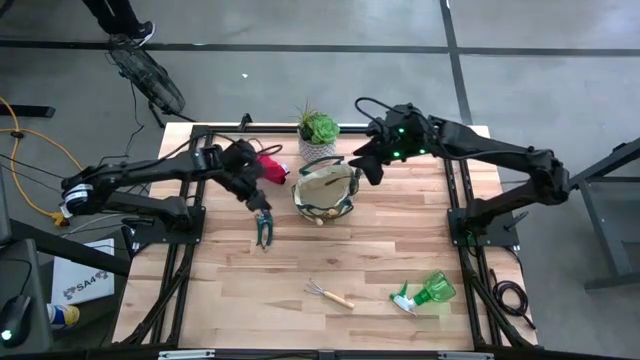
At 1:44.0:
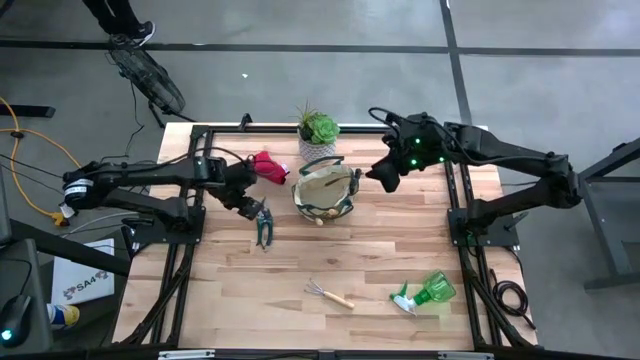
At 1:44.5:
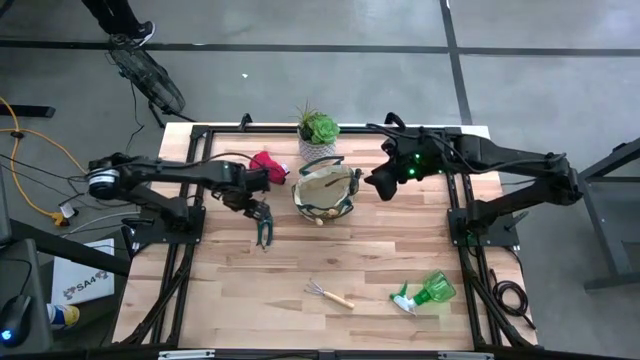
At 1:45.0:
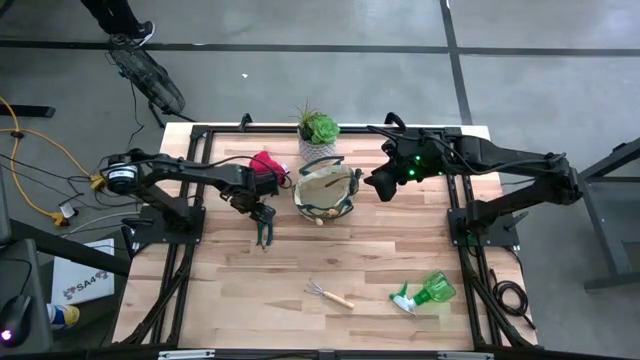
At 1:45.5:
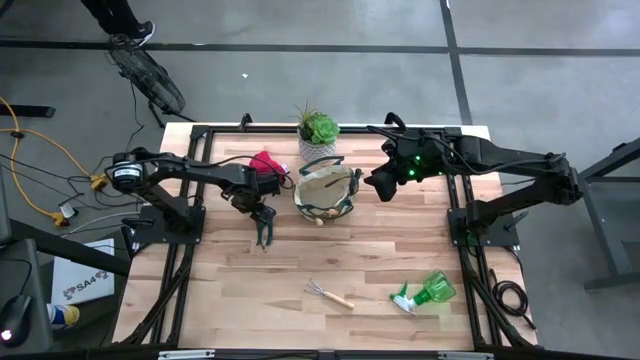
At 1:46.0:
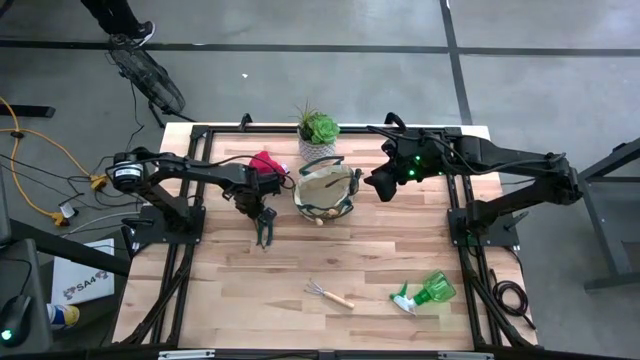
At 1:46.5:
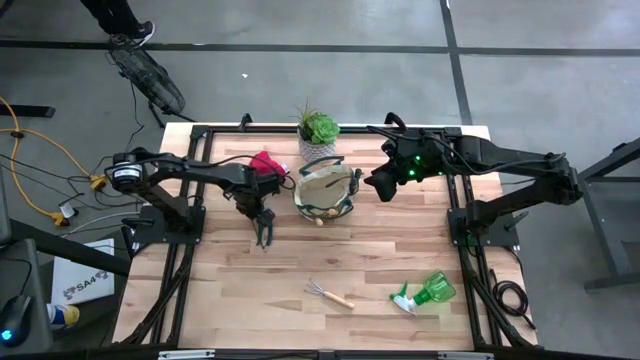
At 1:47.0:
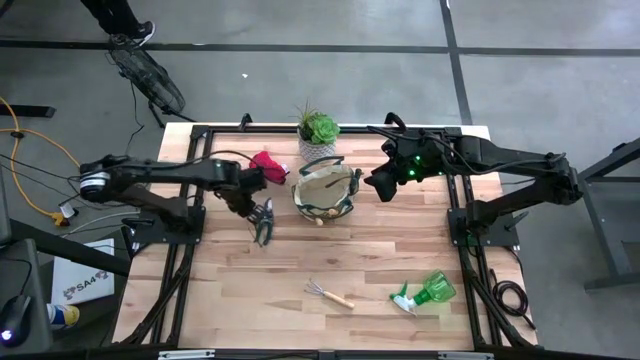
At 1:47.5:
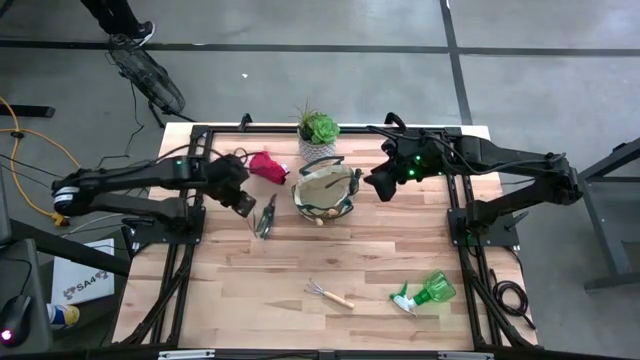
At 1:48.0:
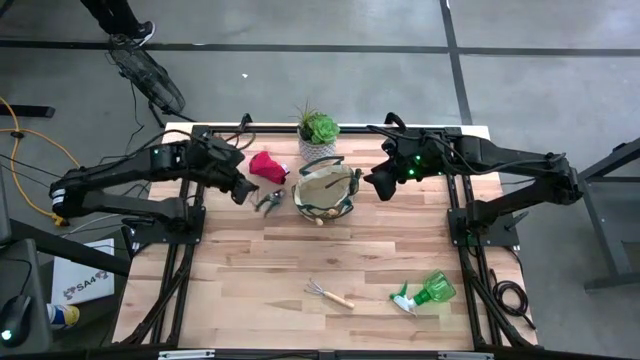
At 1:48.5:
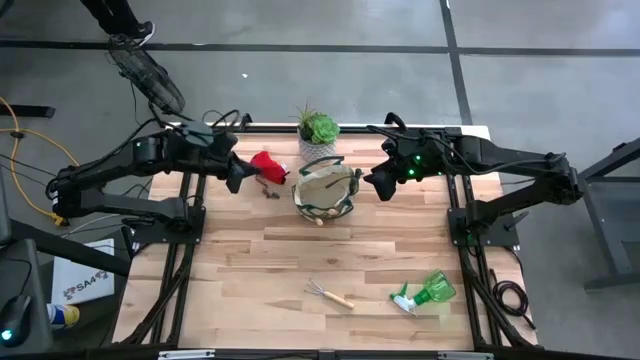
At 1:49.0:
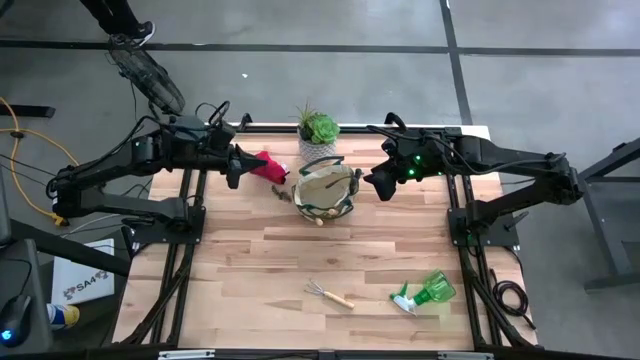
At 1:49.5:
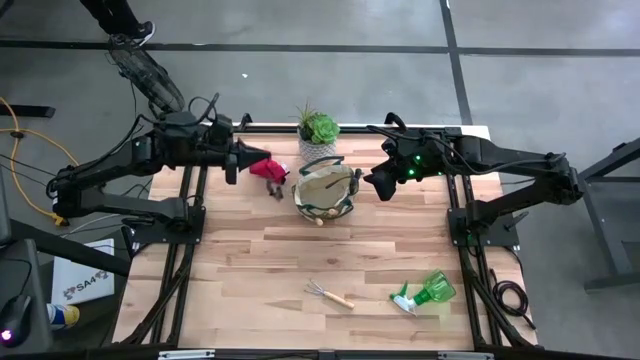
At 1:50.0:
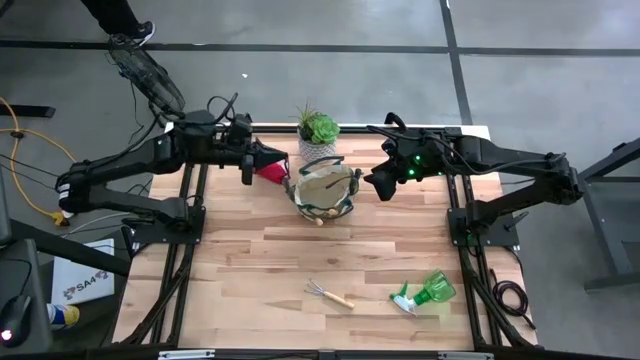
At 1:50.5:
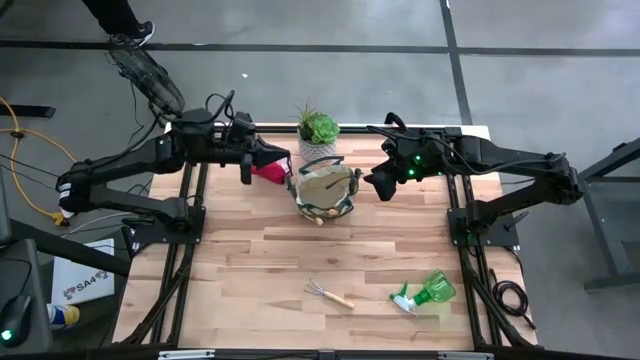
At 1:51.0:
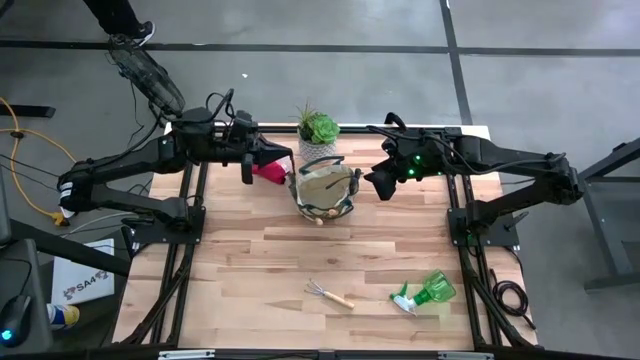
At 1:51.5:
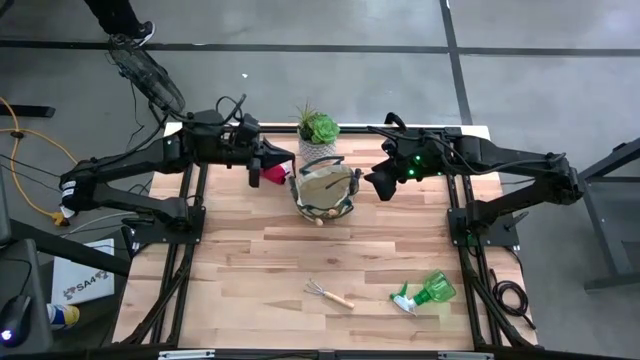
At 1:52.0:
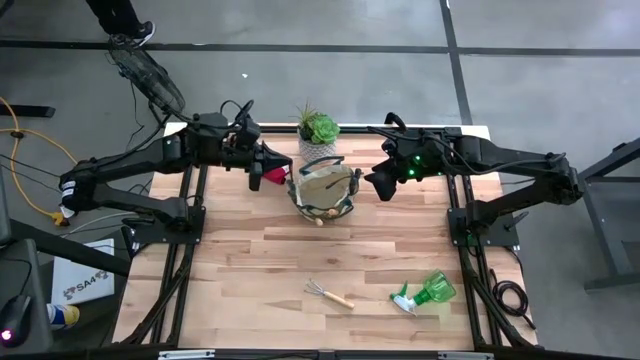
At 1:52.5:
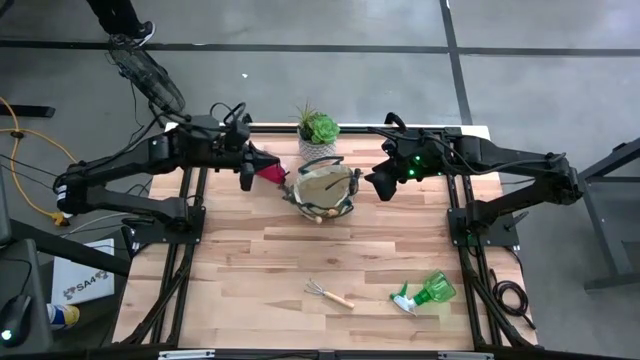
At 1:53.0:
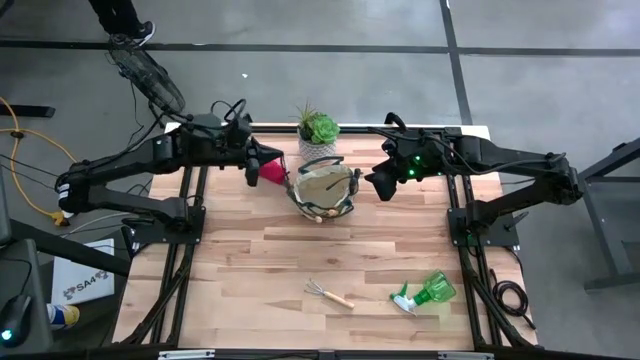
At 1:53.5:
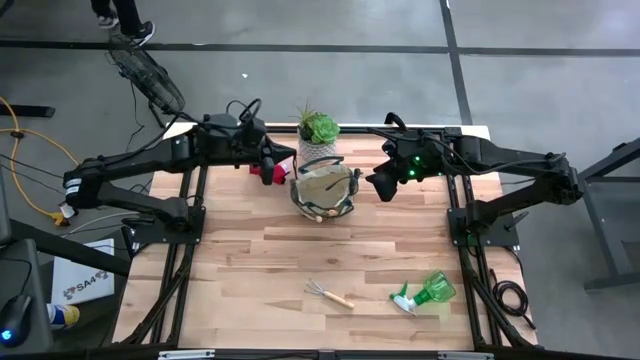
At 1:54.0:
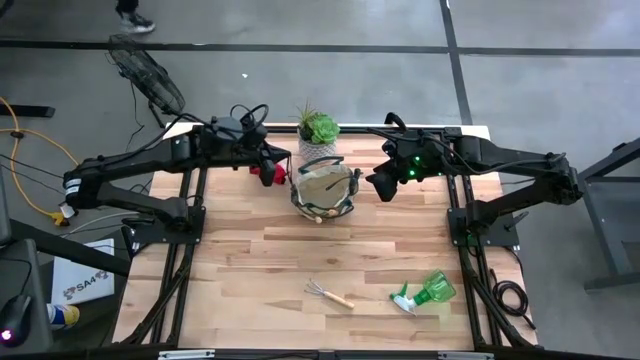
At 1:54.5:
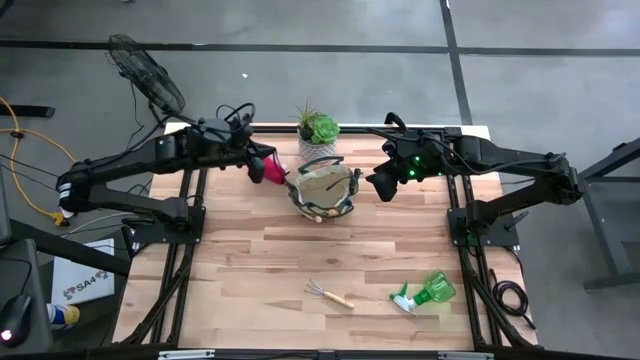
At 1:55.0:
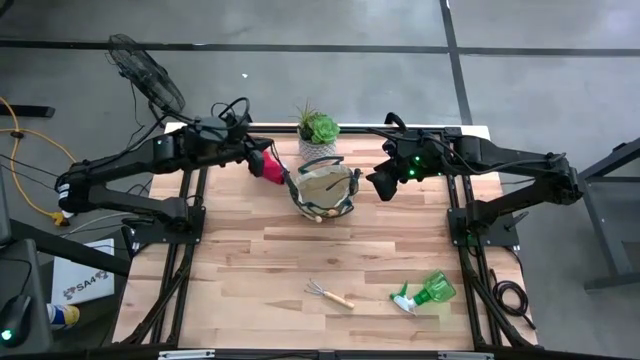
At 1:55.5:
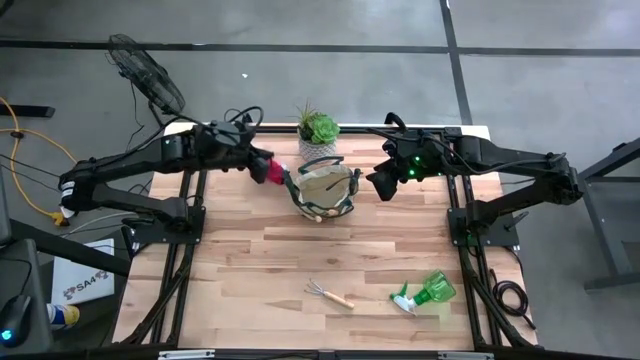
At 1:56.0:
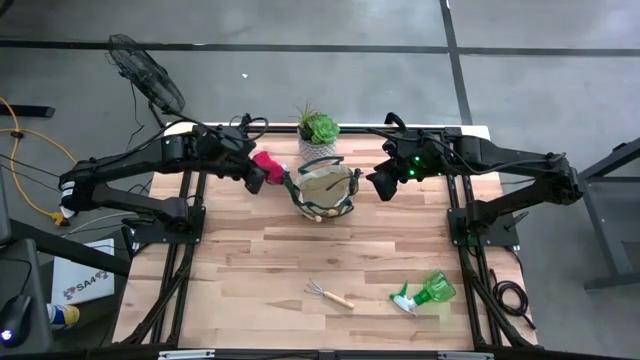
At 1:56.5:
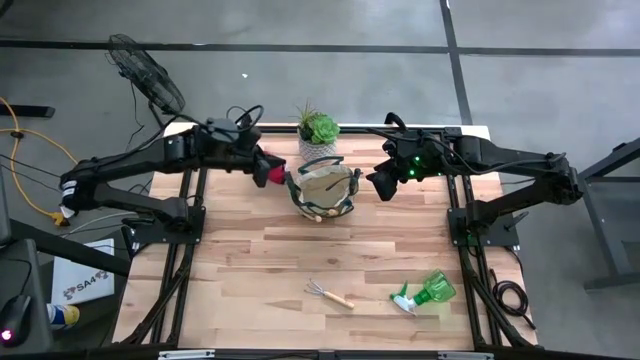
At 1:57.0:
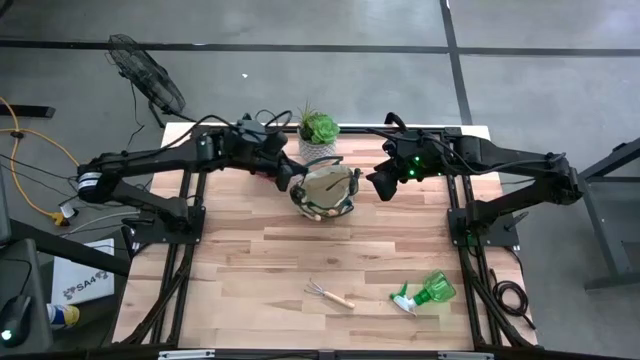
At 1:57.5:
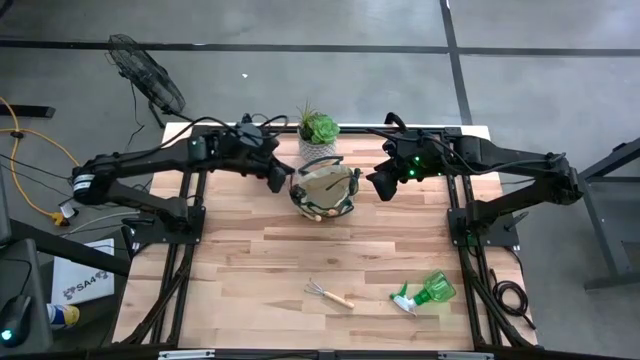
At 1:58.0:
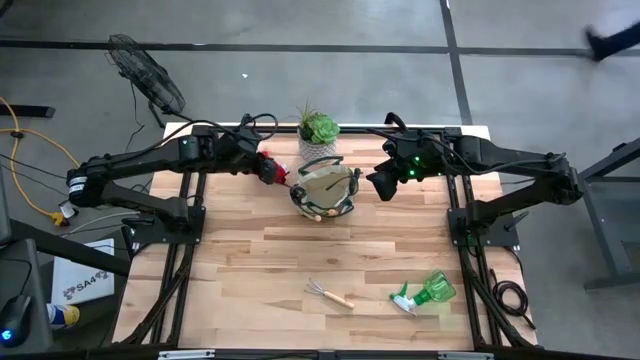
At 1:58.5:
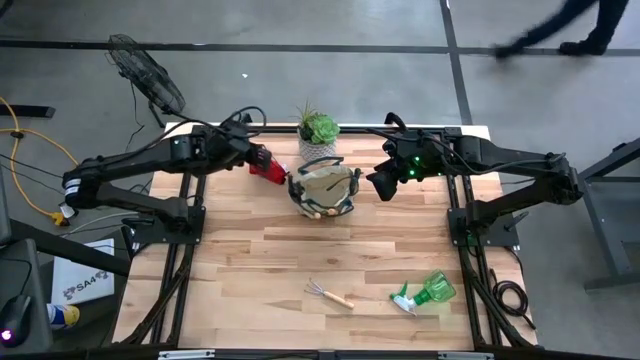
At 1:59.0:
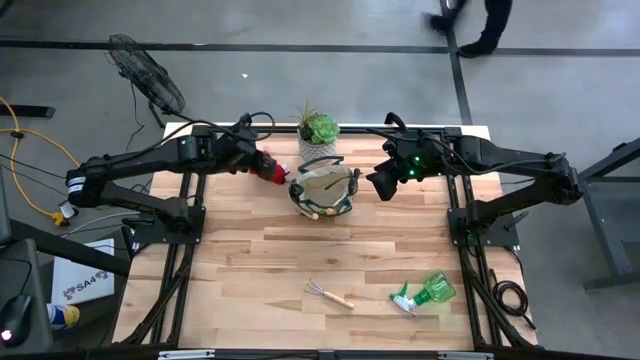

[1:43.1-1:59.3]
Task: Pick & Place Garden tools in Gardening bag
Put the green shear scissor into the gardening bag

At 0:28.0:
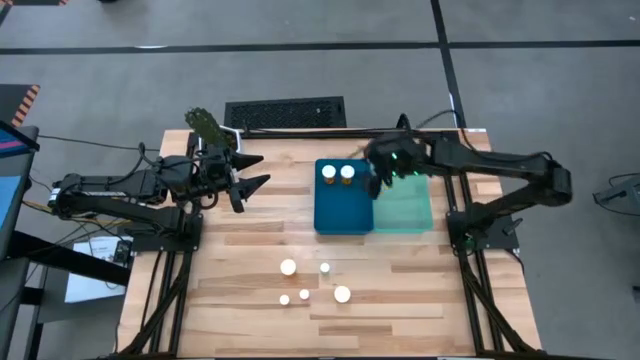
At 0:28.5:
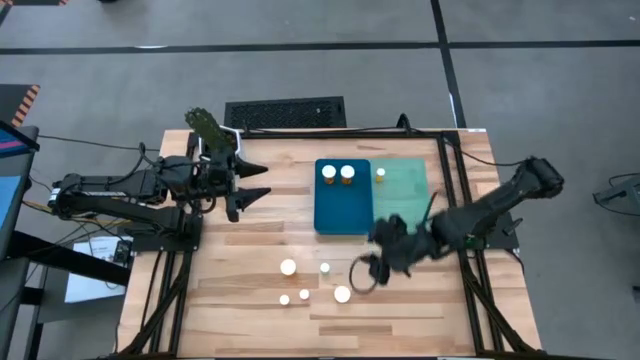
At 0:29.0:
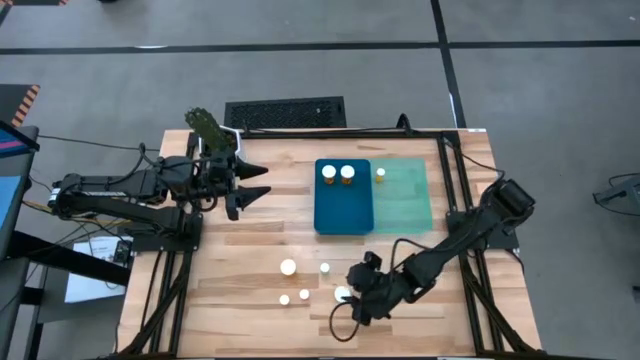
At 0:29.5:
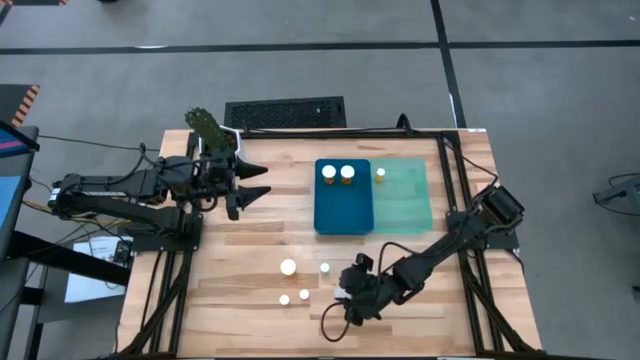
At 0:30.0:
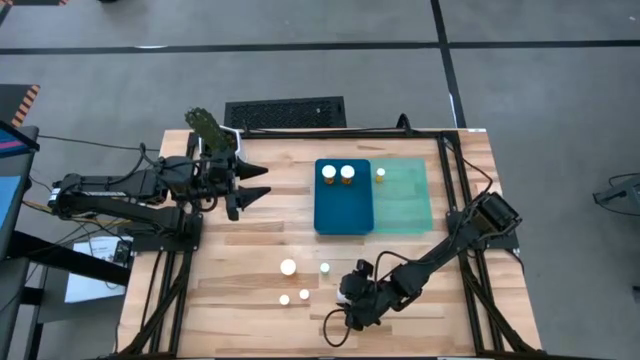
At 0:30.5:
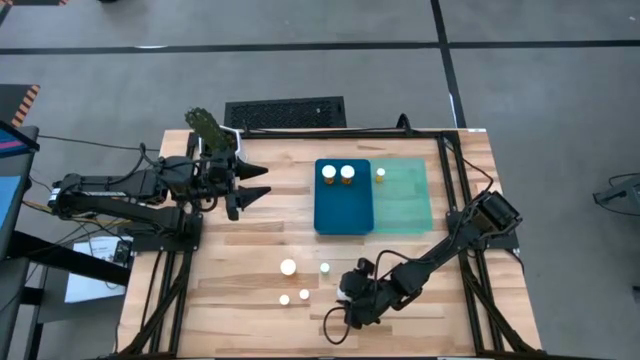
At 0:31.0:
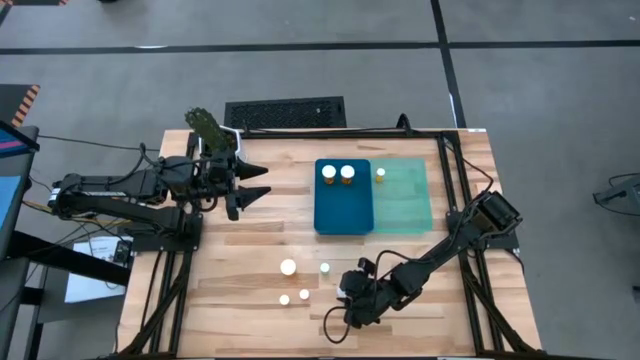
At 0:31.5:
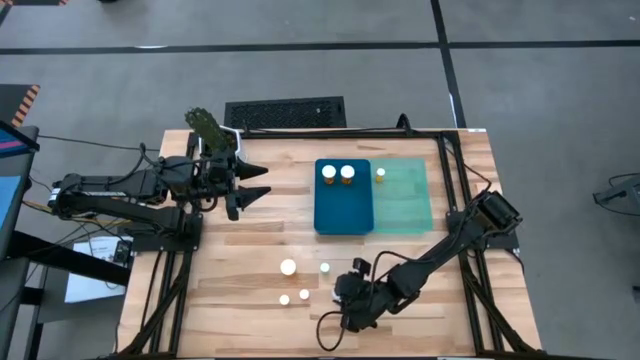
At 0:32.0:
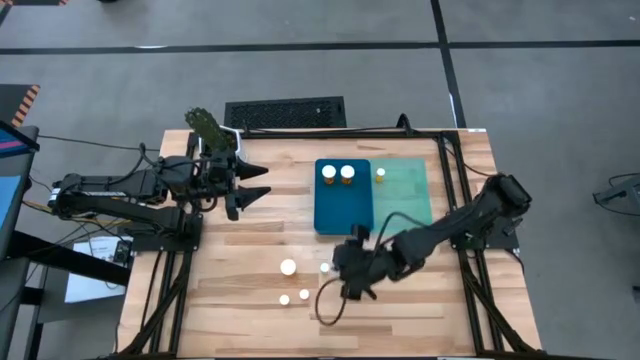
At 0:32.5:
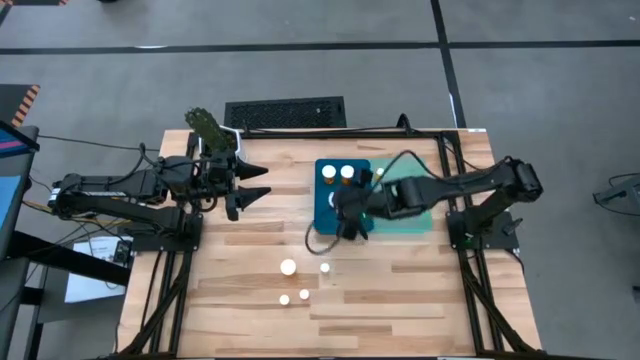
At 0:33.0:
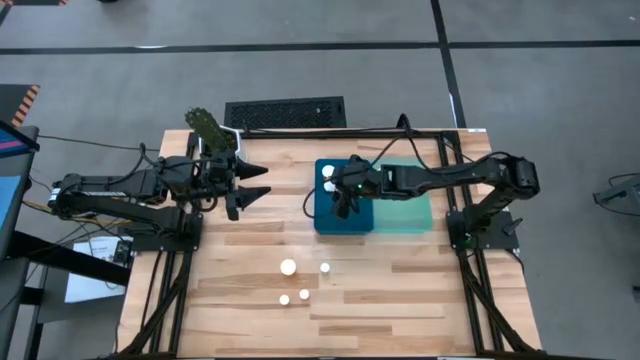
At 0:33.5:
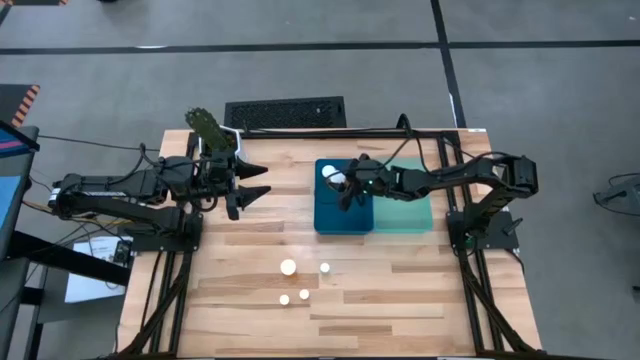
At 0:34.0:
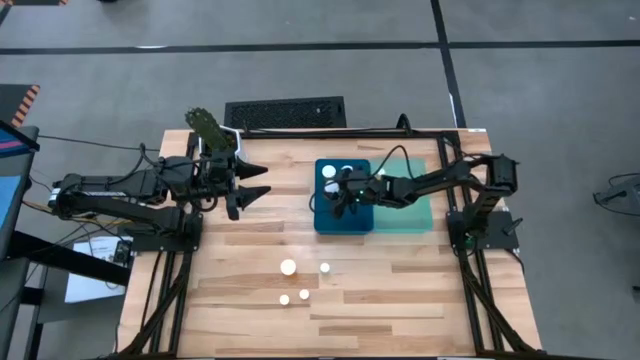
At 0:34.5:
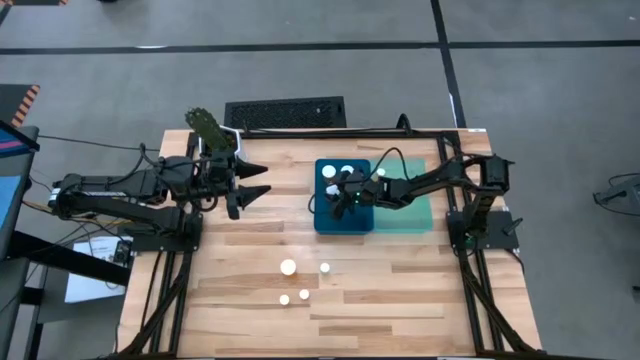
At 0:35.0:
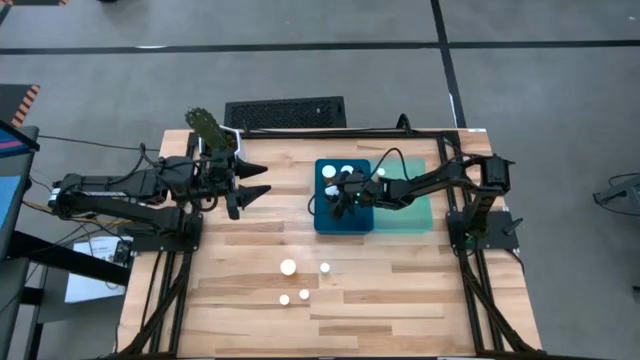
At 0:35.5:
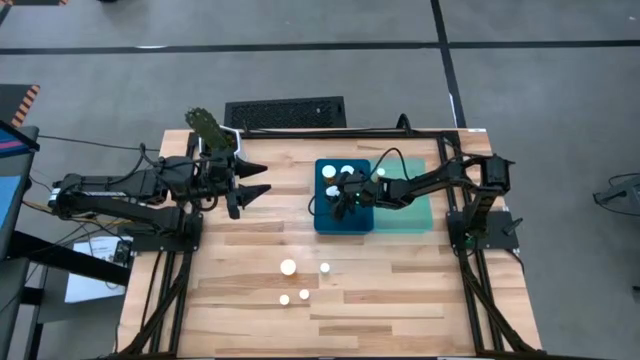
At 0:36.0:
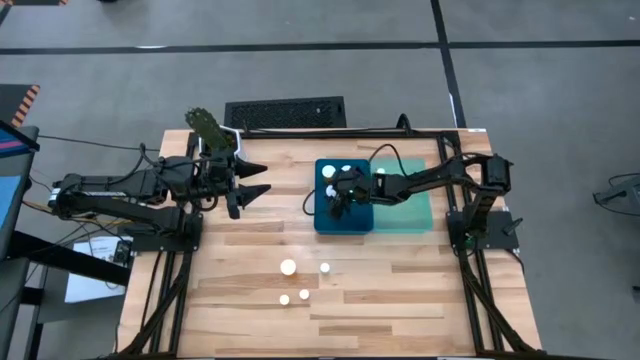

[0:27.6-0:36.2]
Task: Pick and place medicine bottles into bin by pill shape (circle, oval)
Put the large orange pill bottle into the blue bin
